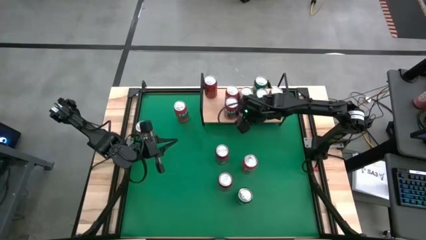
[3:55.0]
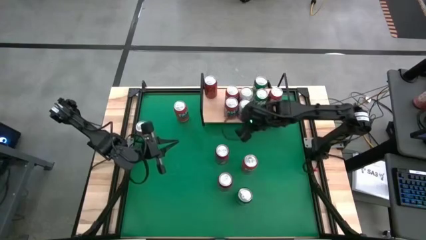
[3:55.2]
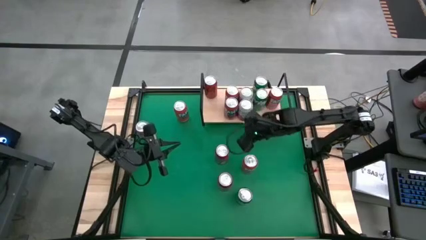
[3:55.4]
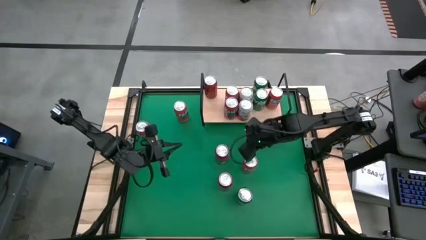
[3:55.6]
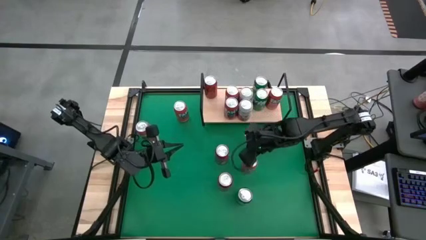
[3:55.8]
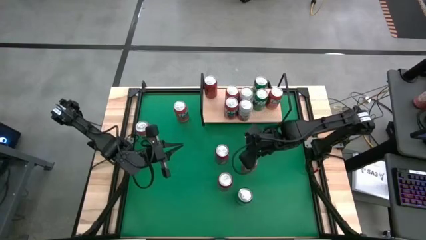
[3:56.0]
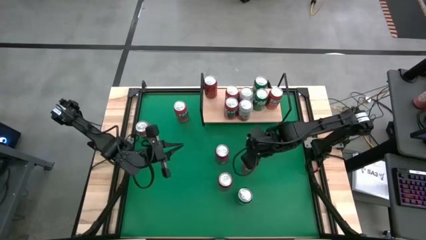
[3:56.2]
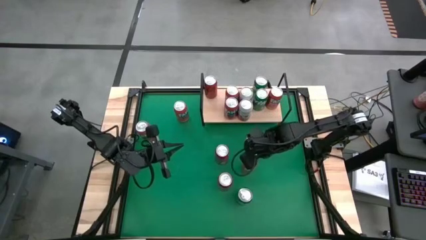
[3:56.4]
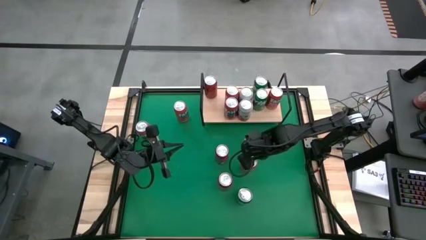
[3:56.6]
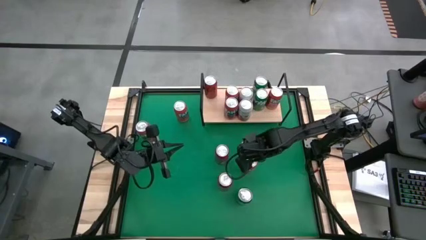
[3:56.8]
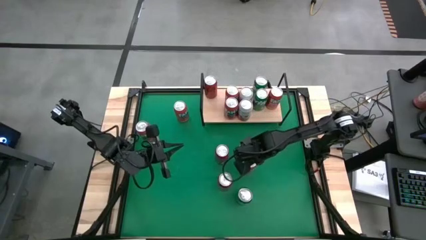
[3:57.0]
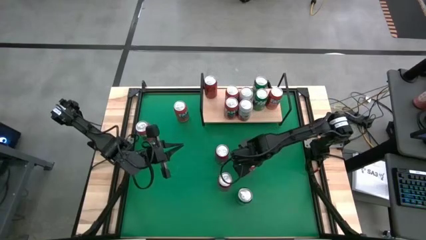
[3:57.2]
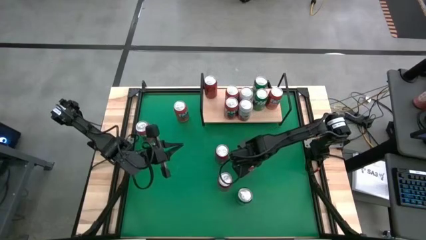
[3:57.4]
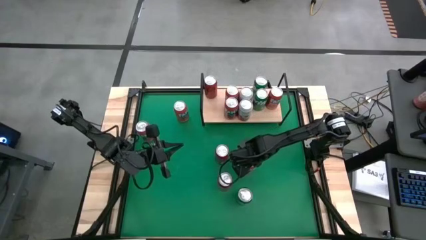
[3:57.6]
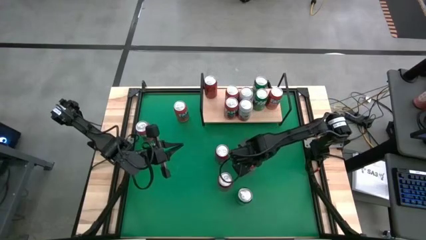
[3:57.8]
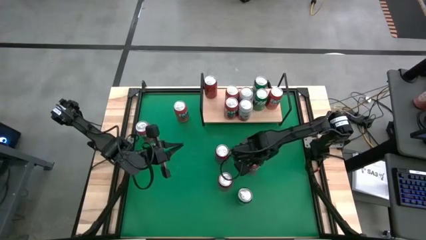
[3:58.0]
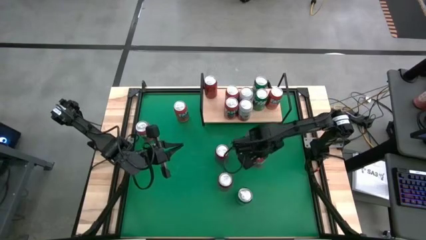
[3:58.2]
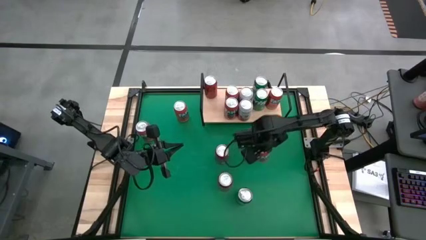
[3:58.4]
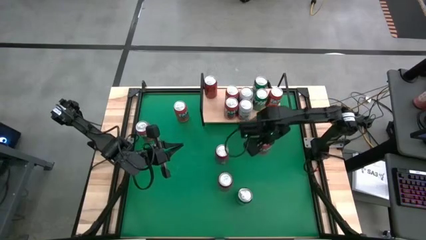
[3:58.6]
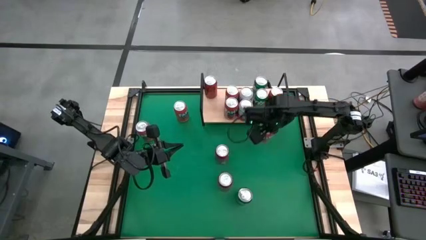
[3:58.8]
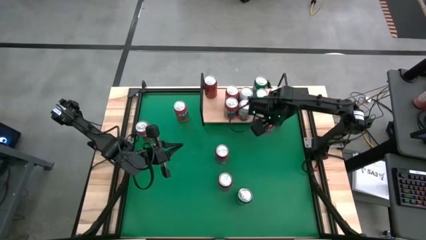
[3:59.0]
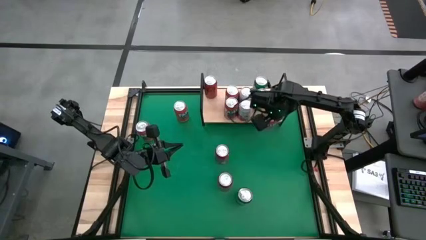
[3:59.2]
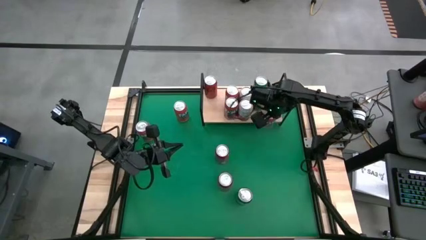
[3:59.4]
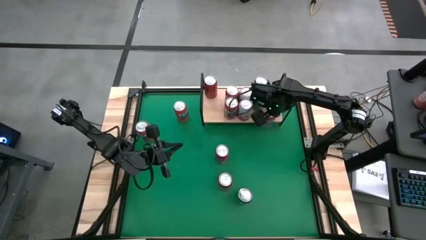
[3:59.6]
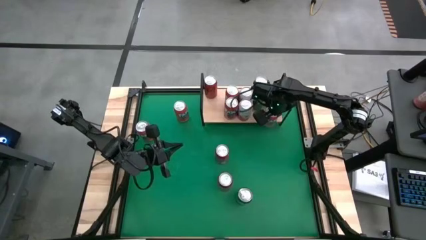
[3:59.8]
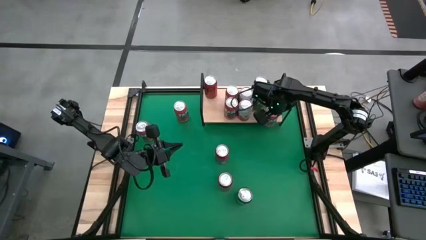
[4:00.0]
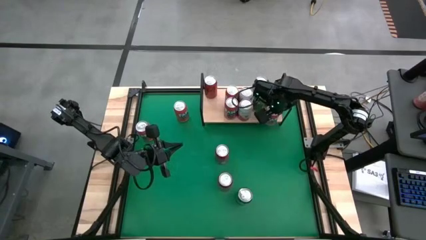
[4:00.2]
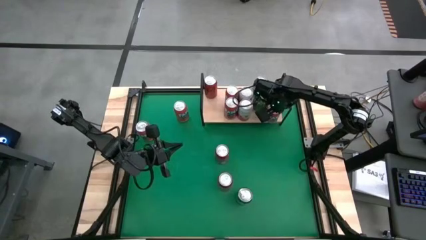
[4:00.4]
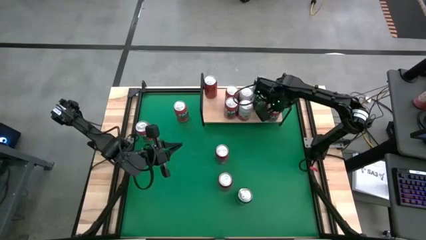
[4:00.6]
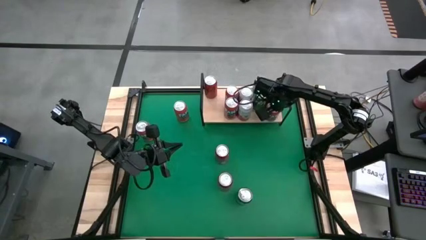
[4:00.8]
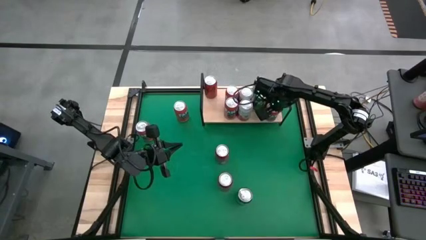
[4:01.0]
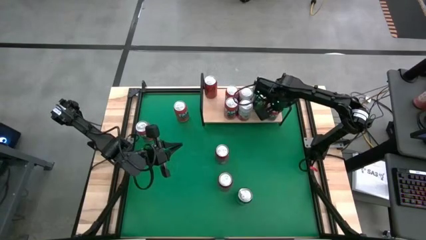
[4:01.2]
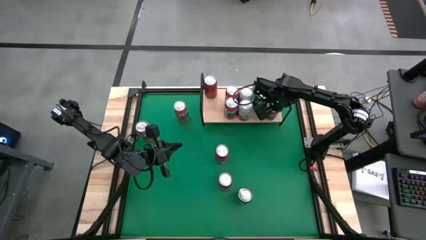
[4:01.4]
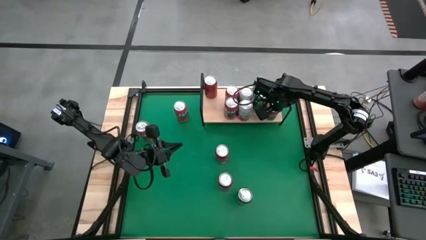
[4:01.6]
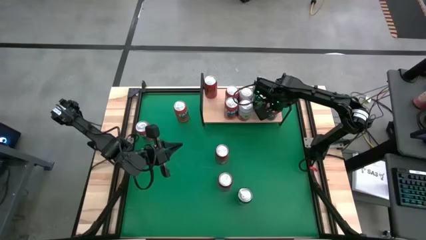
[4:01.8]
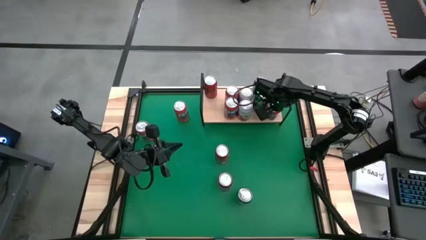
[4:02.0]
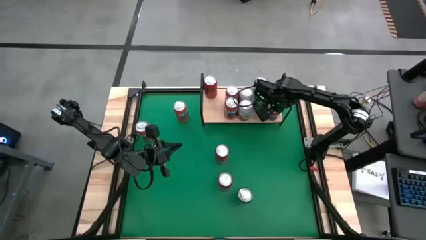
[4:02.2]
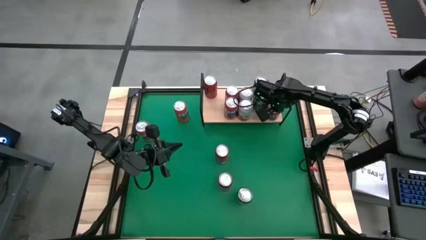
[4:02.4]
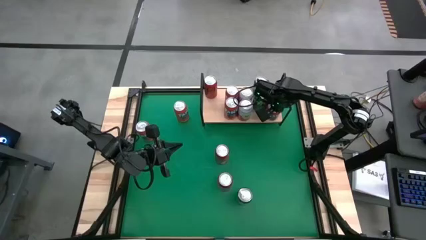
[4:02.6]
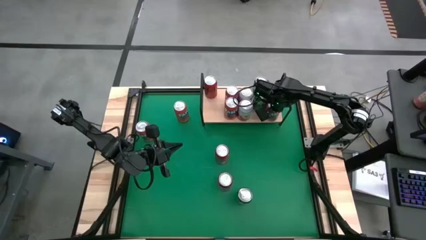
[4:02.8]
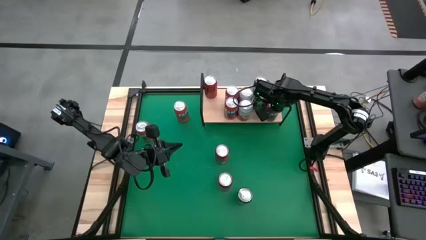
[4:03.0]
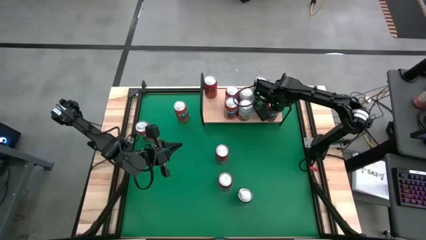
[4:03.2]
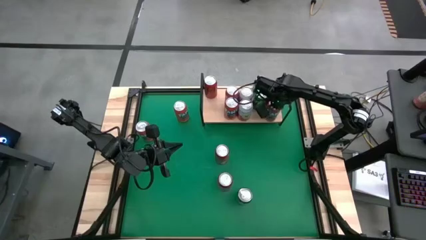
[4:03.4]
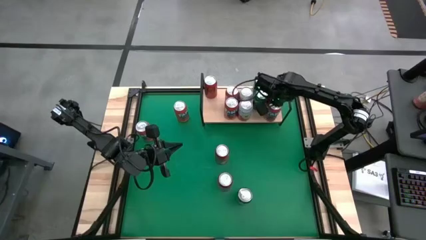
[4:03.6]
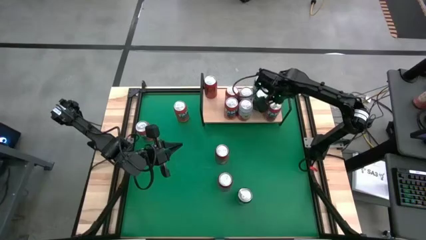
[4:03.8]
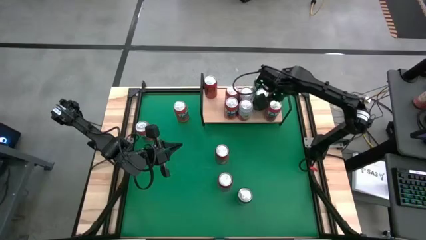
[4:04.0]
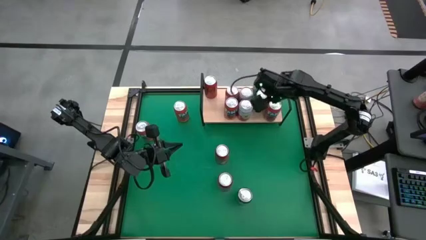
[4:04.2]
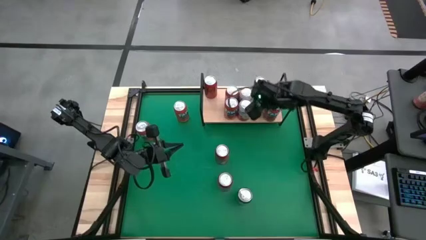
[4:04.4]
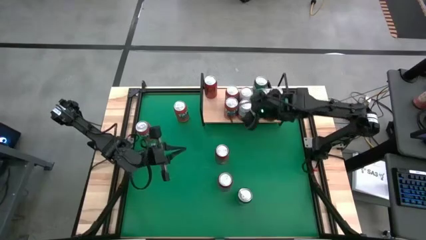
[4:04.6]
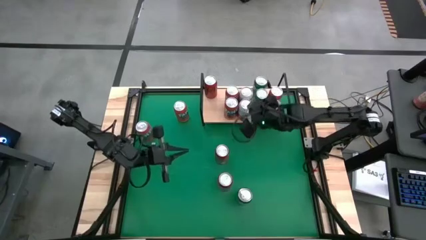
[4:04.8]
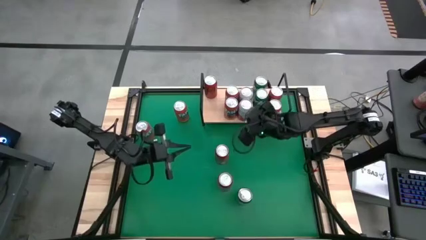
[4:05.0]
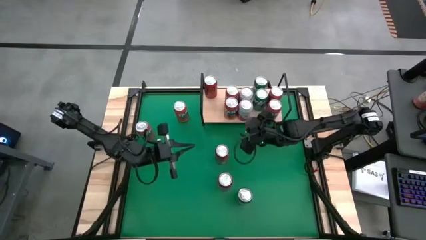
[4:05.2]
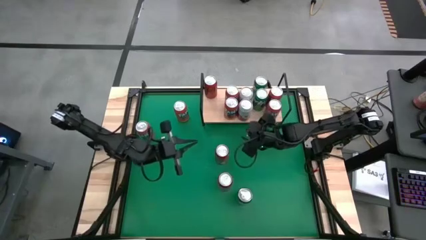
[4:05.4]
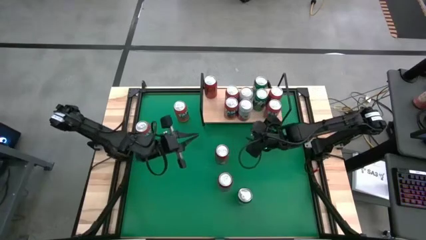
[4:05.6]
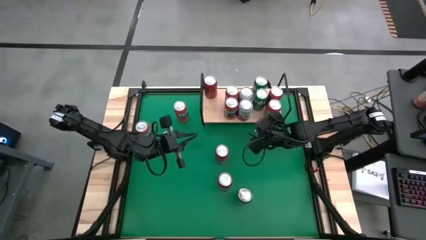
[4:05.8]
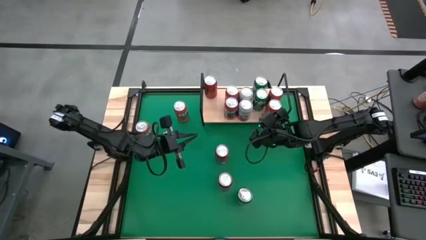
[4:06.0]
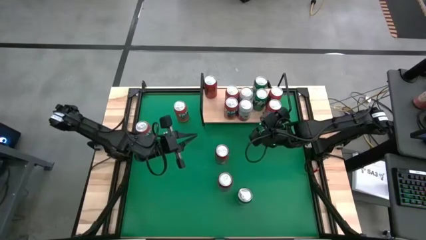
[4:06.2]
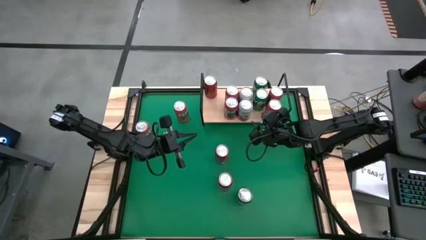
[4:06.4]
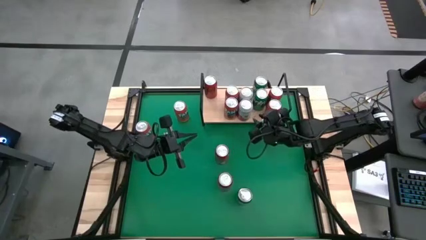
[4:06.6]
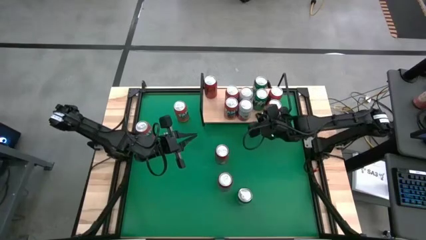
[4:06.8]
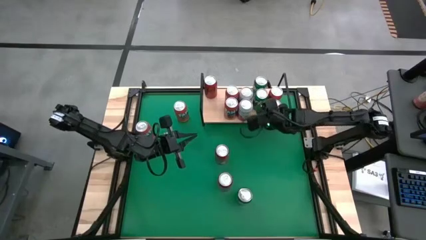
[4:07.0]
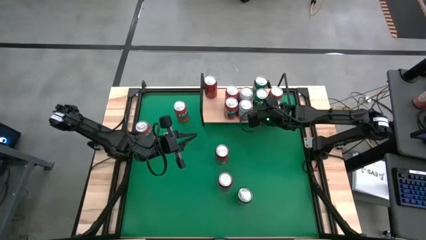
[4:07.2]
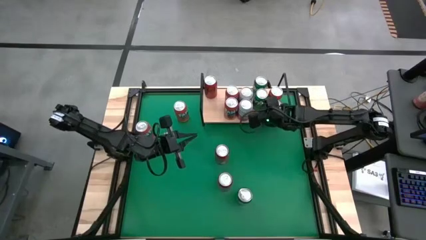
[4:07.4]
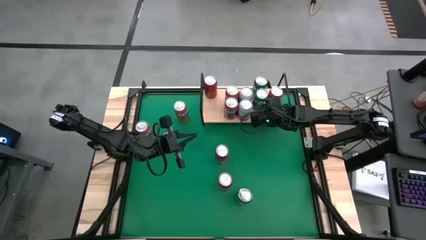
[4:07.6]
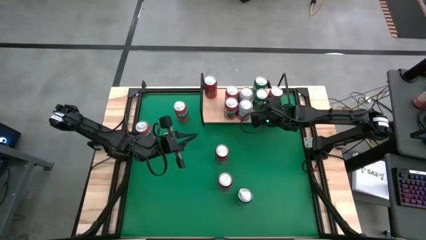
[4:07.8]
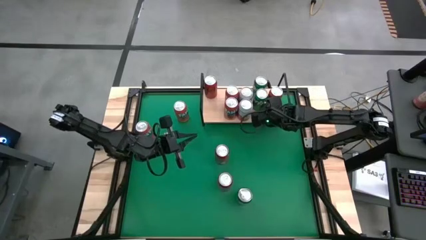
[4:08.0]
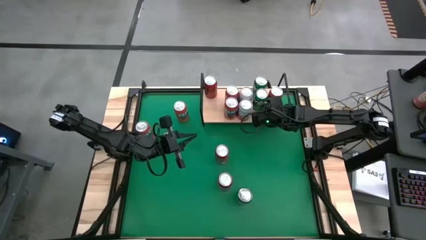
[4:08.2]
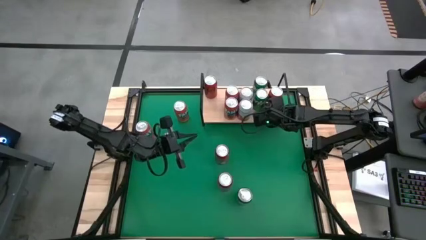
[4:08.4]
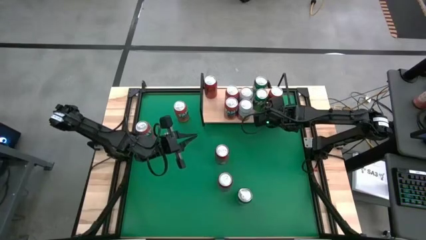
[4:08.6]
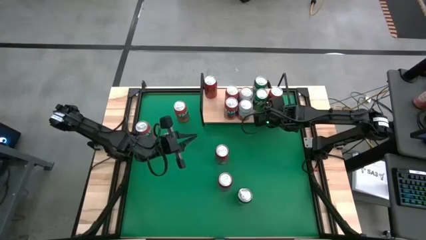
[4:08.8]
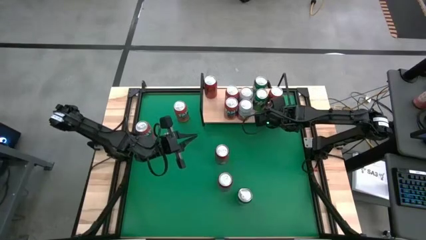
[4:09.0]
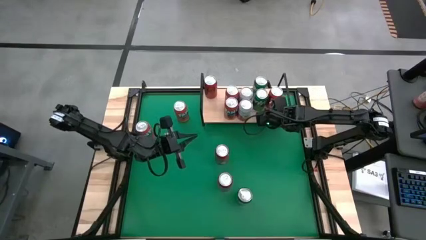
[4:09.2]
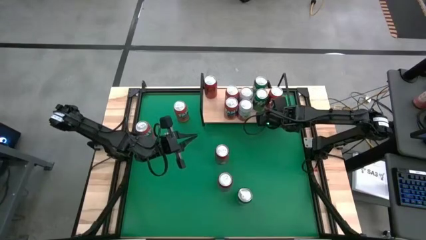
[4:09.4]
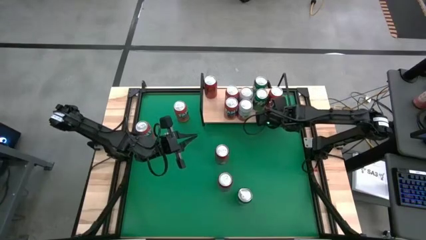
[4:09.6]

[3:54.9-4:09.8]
Task: Place canned beverage on shelf
Put the red soda can on the shelf aligned with the other red soda can

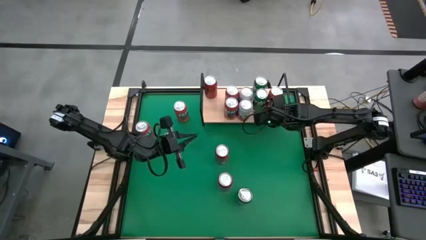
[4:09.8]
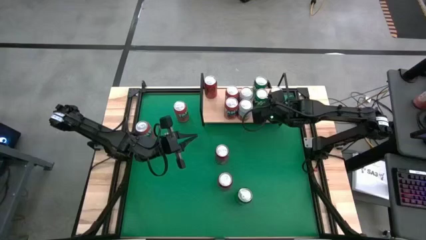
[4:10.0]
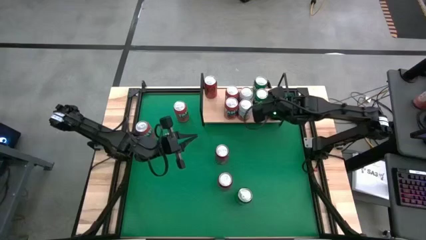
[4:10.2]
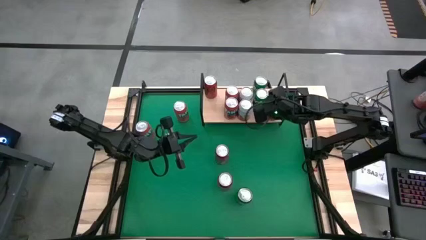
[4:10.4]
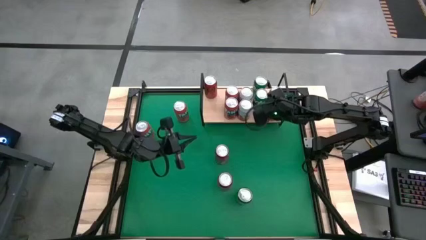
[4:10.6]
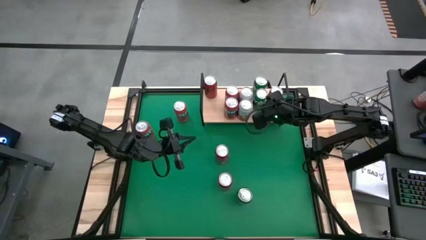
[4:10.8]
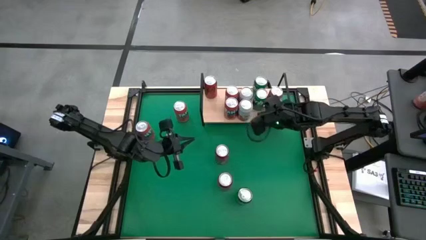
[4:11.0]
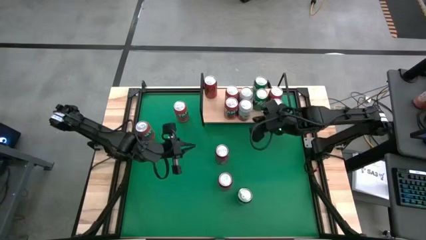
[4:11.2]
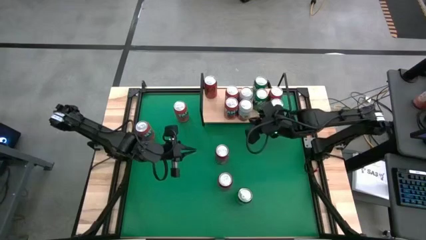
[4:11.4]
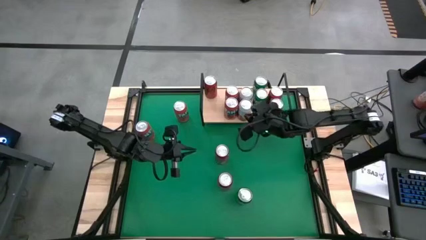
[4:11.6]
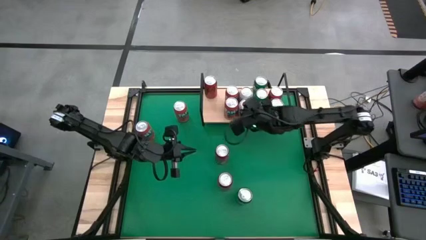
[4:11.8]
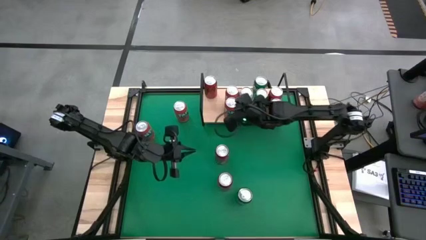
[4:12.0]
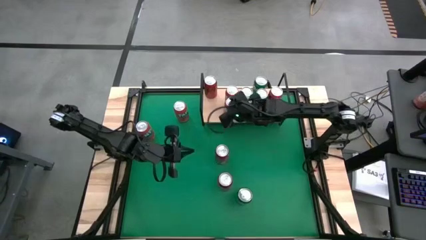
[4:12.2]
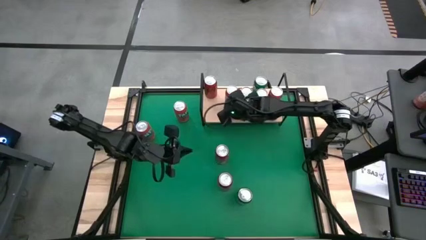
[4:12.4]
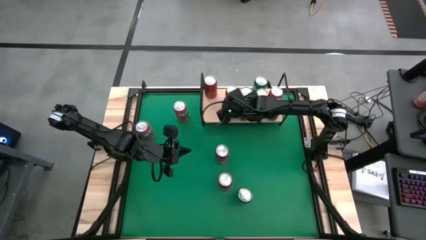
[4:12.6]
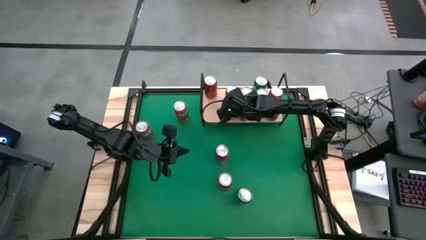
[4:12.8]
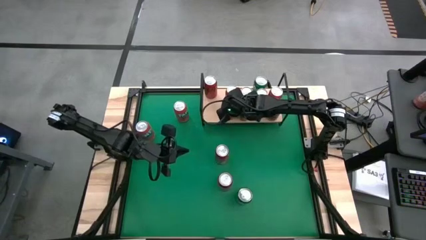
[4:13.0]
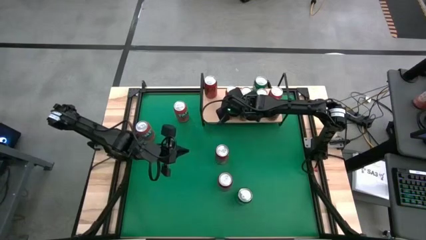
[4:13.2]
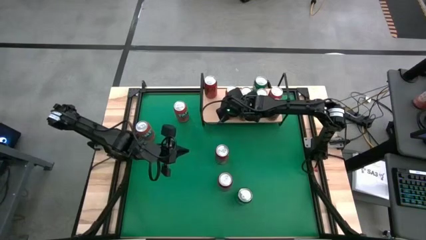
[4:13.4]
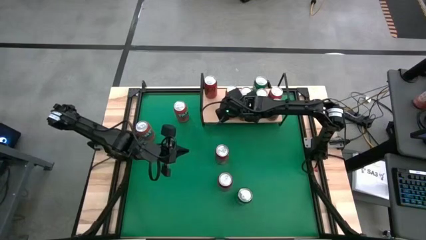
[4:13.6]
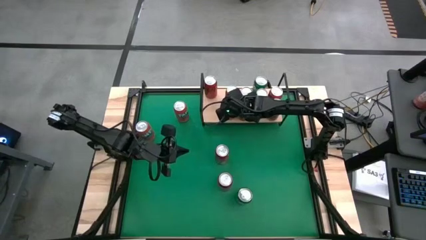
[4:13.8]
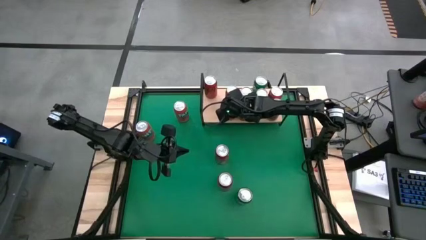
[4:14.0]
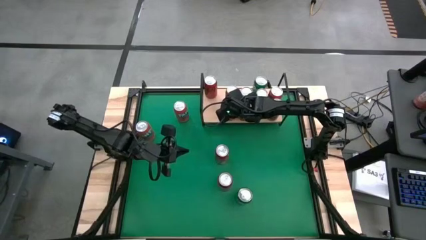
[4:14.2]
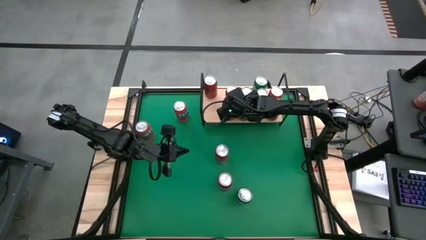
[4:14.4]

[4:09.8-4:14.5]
Adjust the red soda cans on the shelf
